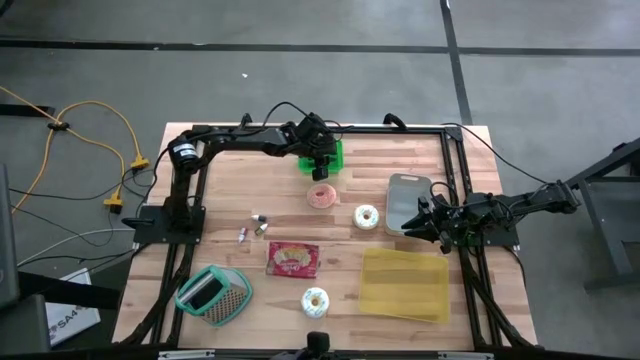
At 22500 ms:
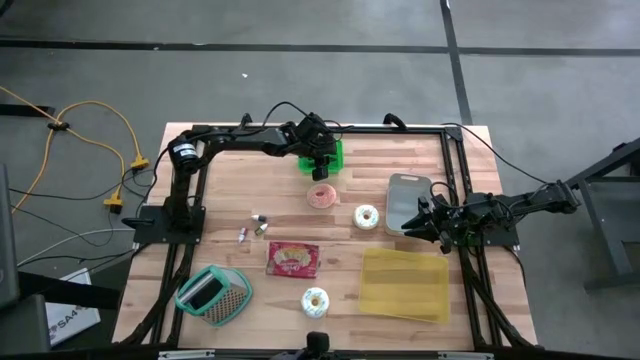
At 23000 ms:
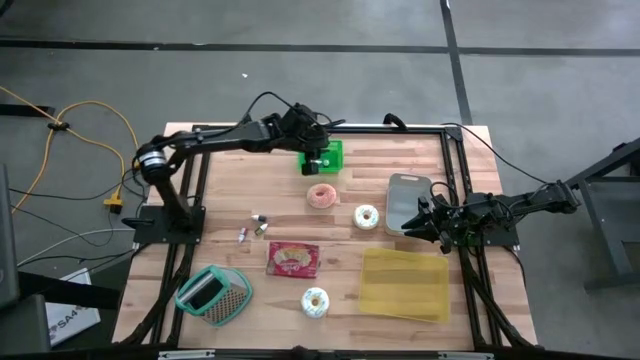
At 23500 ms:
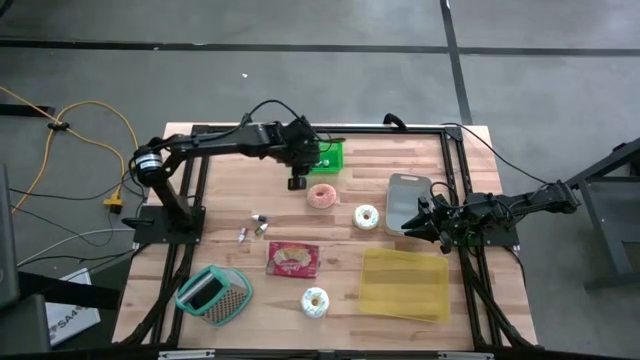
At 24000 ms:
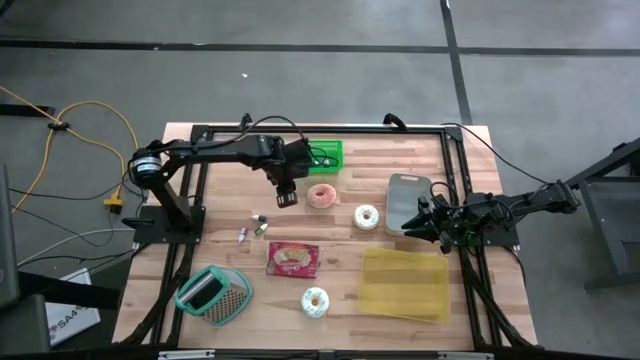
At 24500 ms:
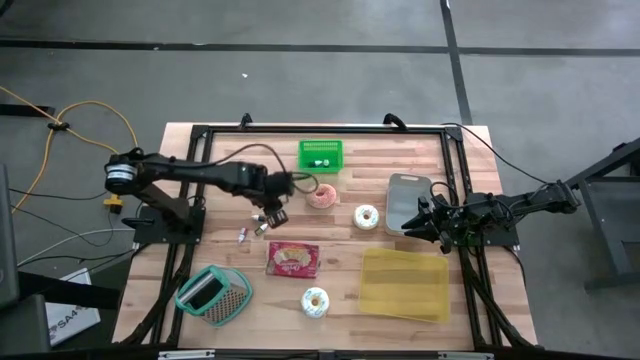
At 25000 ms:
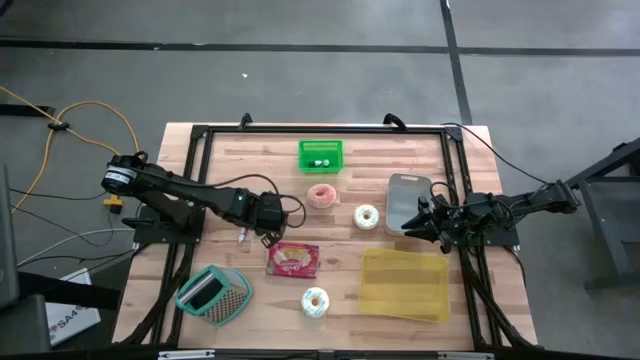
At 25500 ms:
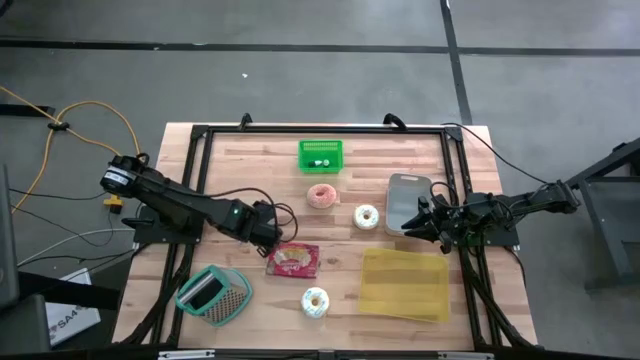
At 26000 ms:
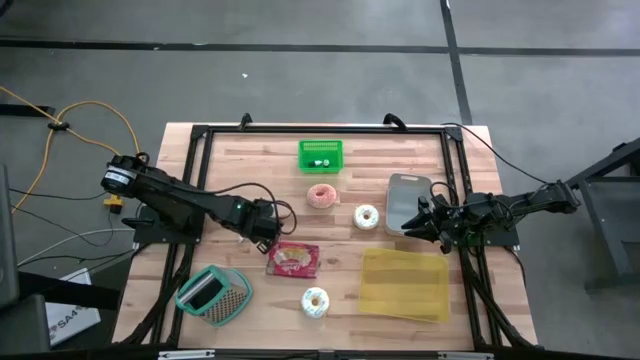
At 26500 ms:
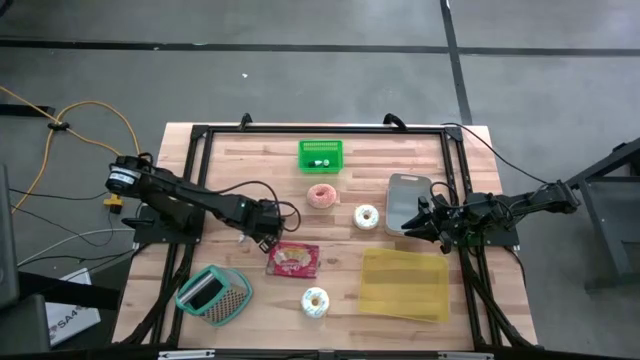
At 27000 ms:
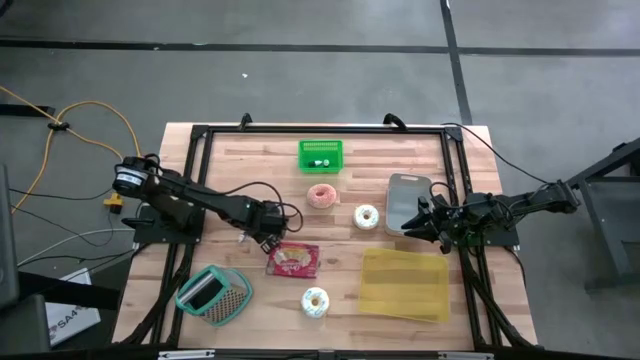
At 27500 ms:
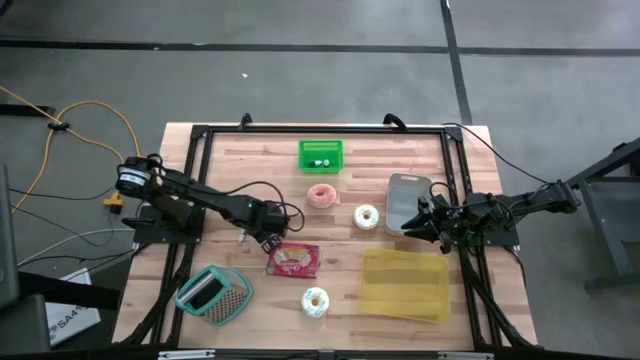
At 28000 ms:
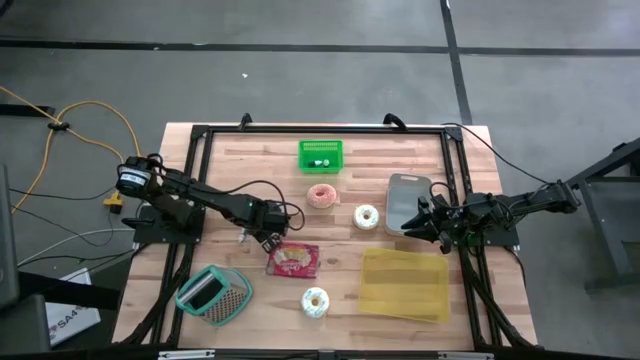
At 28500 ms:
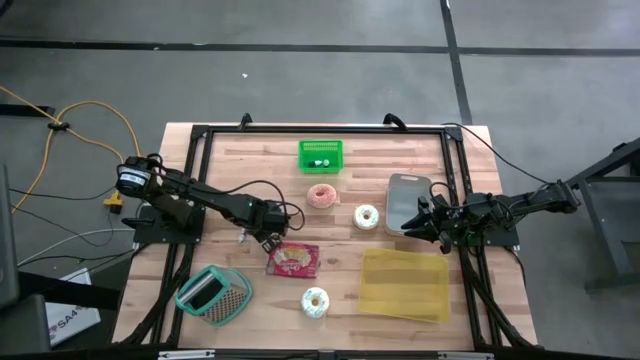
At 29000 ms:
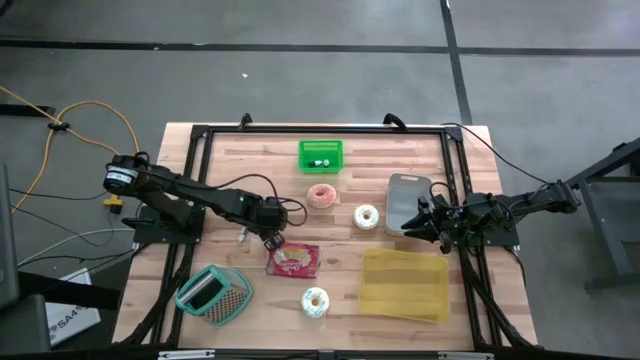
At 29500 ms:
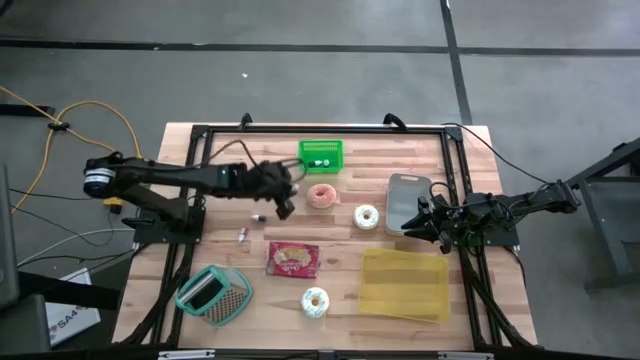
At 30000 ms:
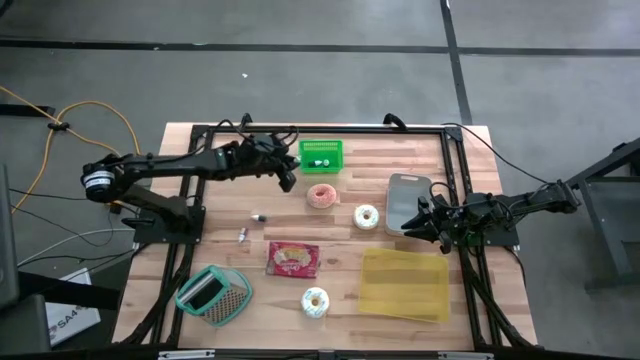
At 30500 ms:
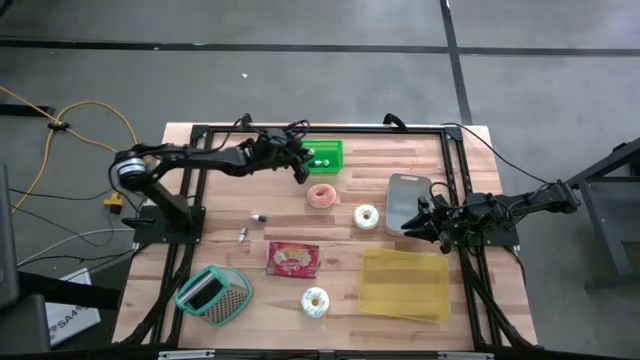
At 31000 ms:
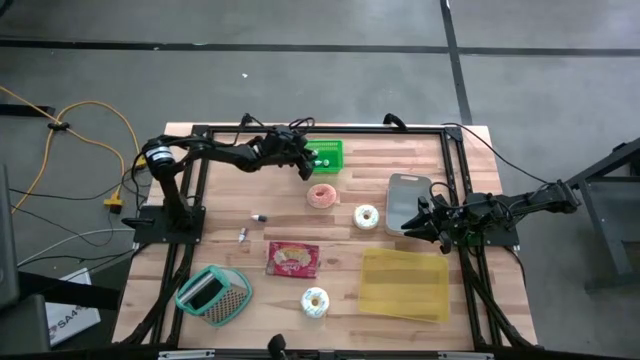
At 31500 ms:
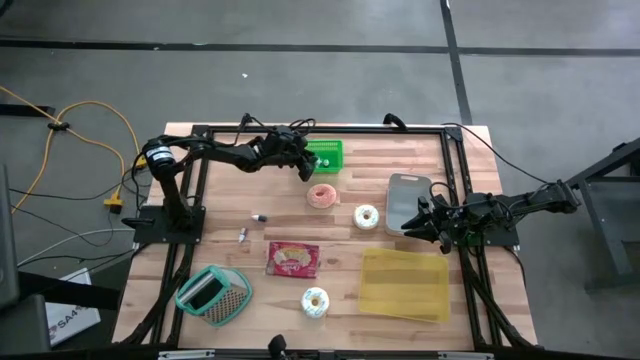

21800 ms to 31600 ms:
Put the green food coloring bottle into the green bin

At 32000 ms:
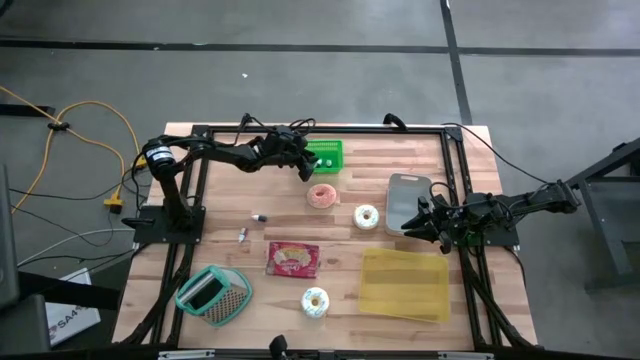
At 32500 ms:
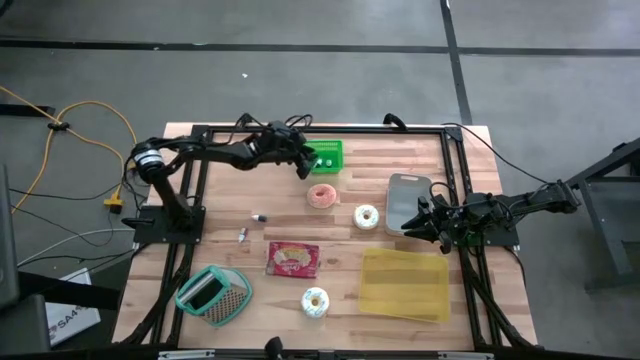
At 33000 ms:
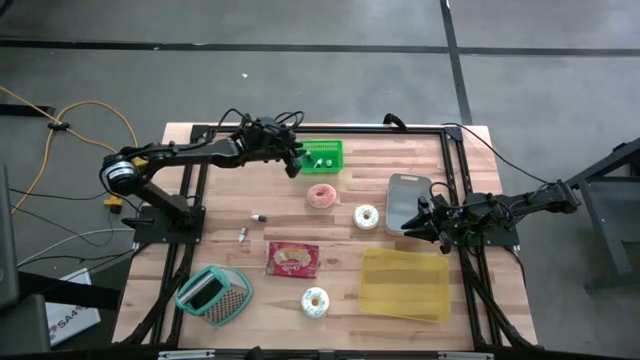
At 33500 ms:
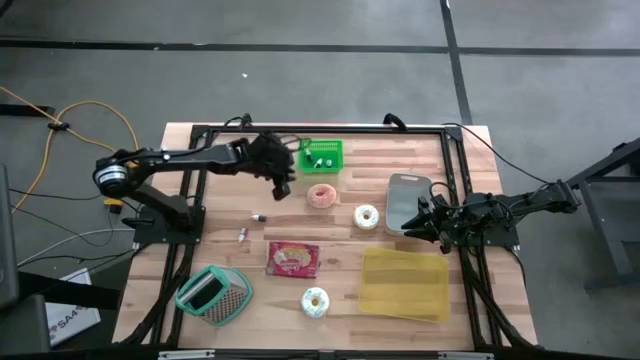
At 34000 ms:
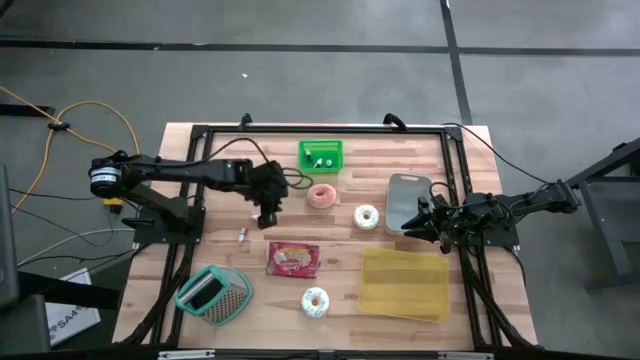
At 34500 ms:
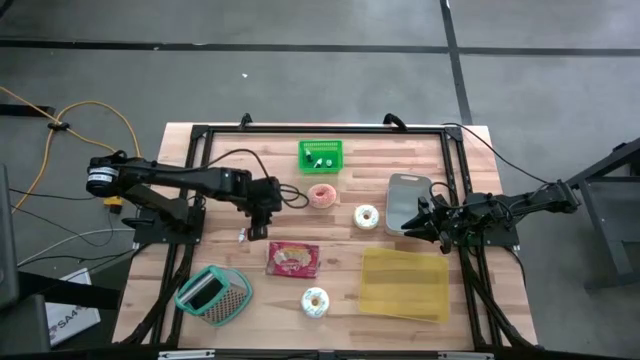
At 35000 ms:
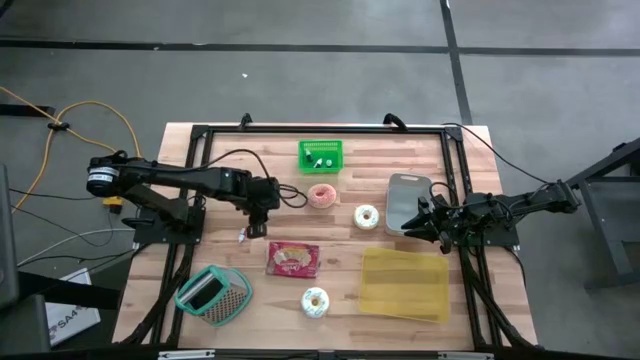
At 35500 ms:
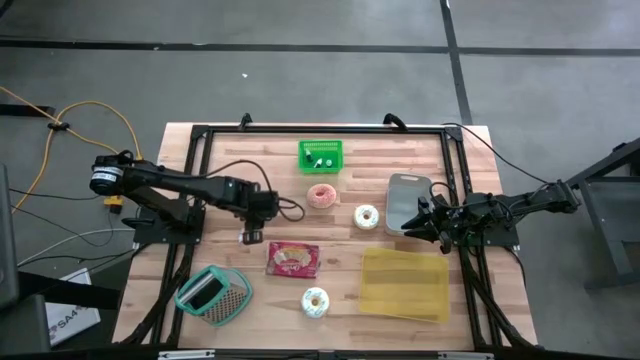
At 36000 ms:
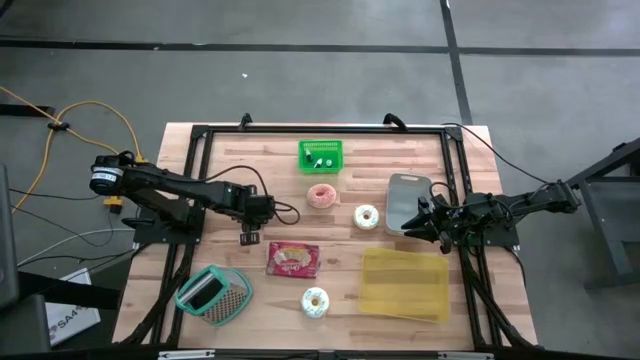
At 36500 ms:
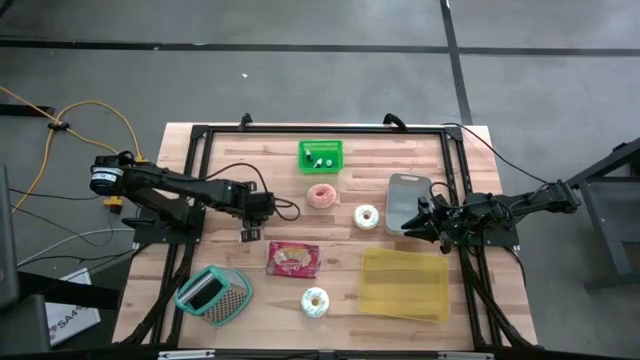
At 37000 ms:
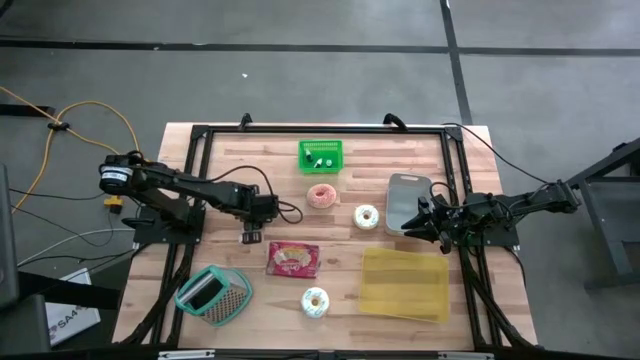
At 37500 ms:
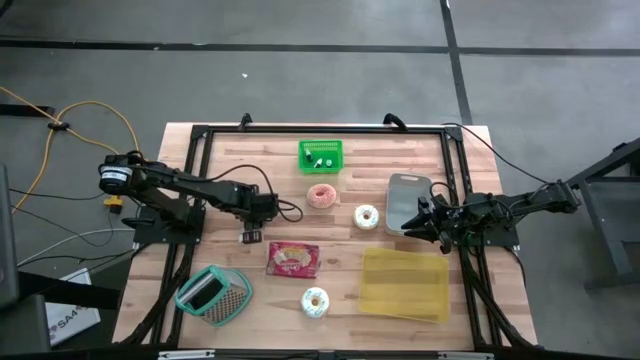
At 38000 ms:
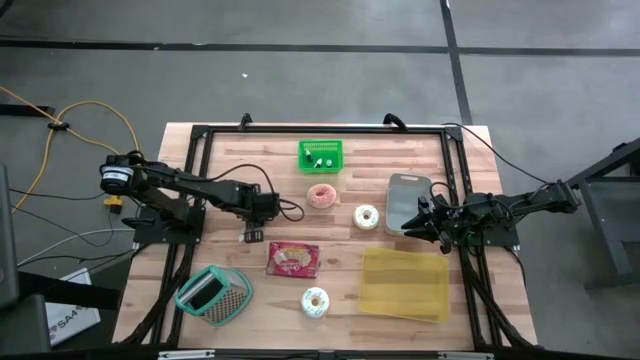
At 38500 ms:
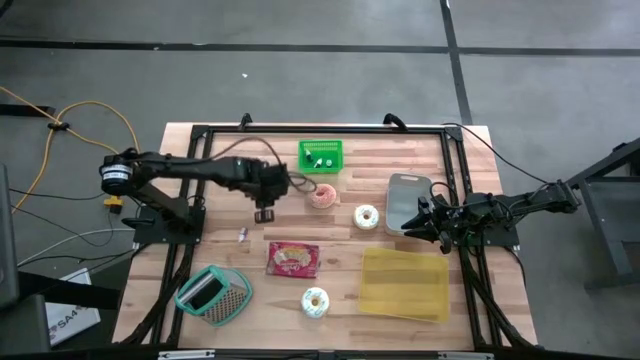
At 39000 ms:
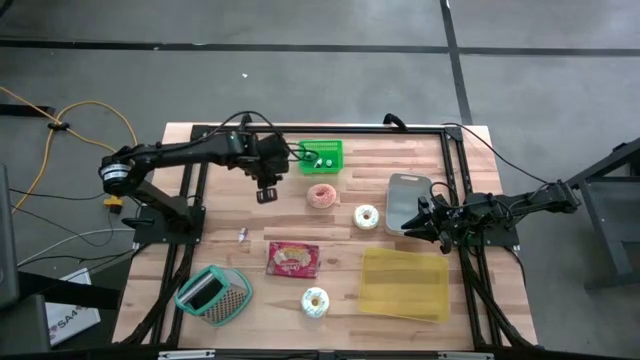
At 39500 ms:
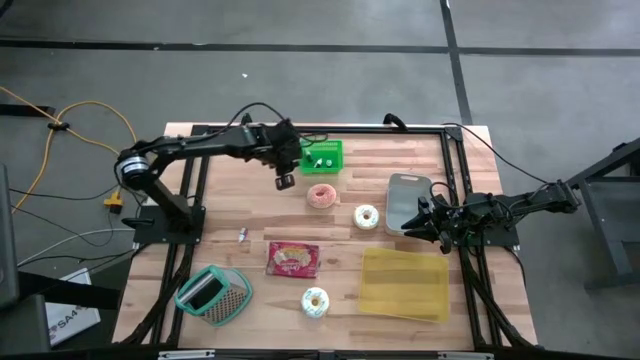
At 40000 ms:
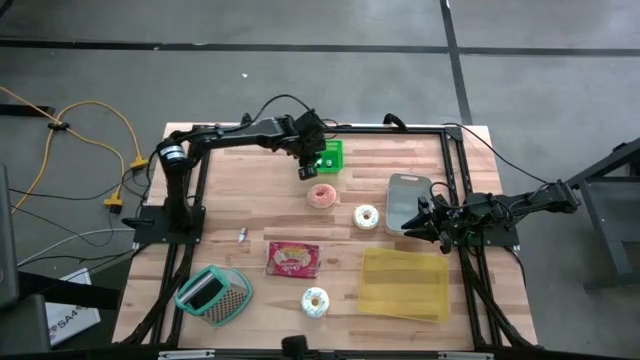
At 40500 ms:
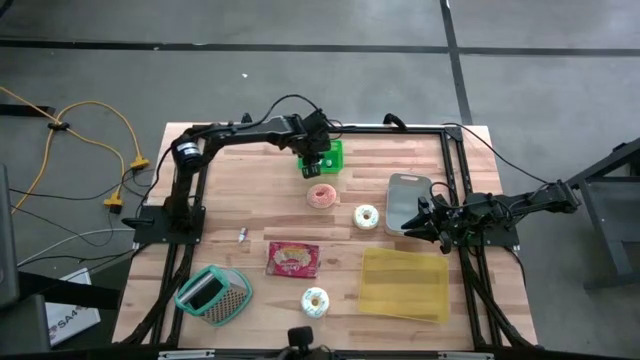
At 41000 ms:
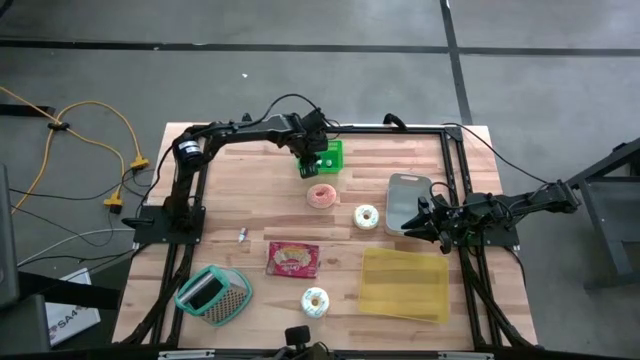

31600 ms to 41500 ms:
Put the violet food coloring bottle into the green bin
